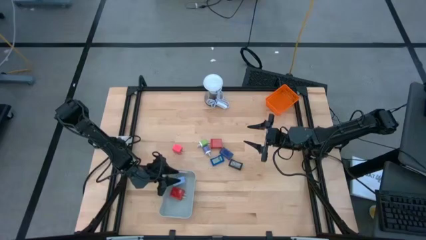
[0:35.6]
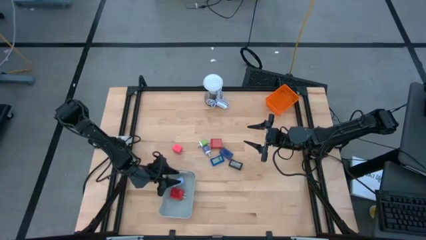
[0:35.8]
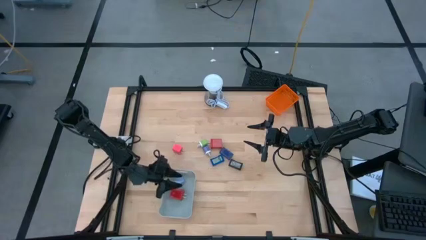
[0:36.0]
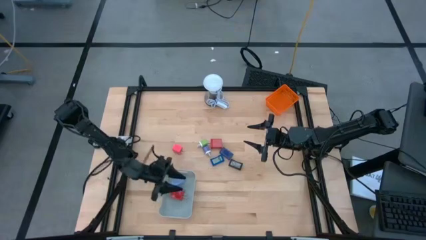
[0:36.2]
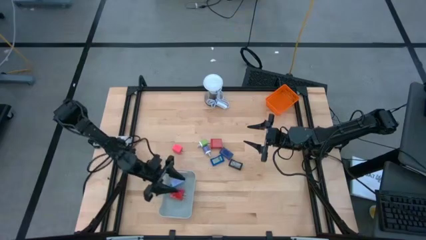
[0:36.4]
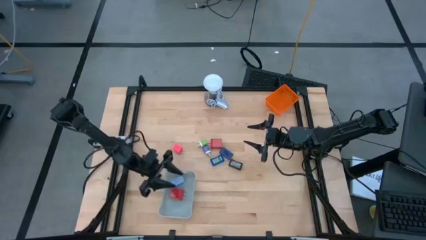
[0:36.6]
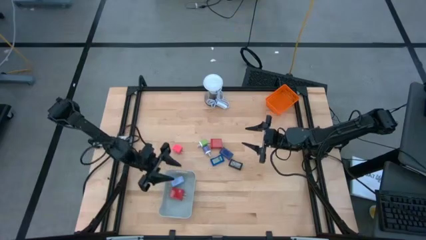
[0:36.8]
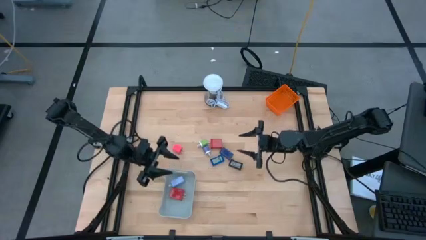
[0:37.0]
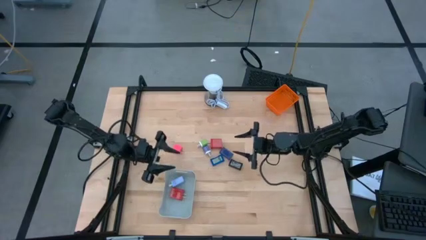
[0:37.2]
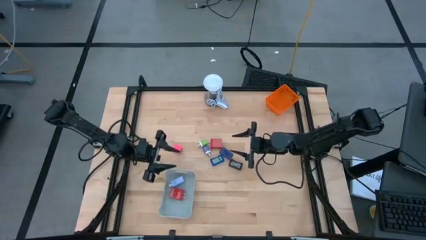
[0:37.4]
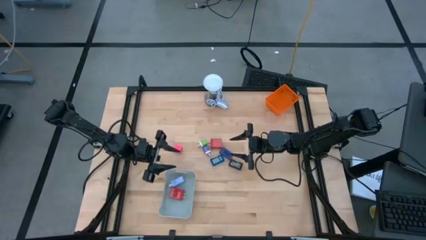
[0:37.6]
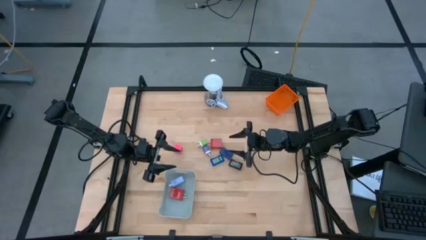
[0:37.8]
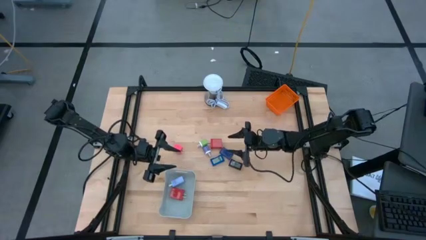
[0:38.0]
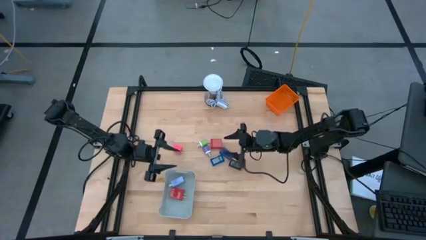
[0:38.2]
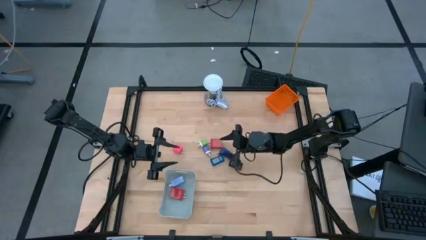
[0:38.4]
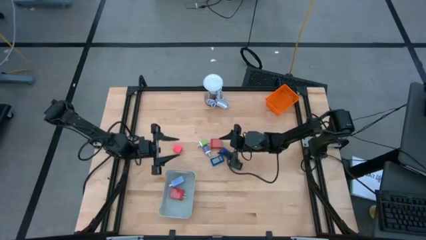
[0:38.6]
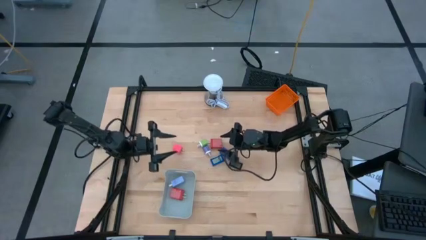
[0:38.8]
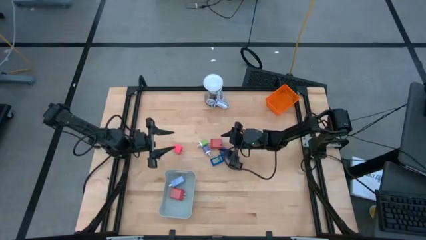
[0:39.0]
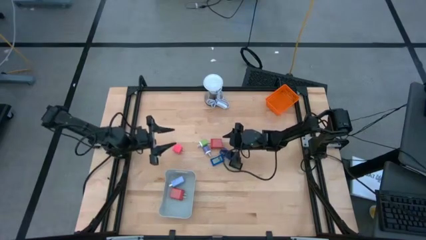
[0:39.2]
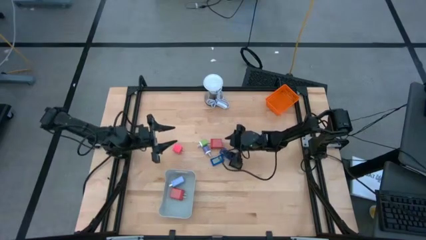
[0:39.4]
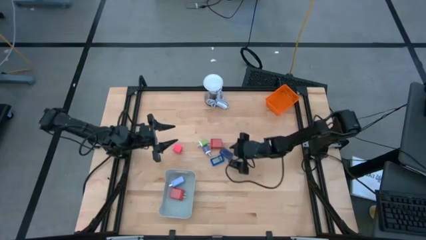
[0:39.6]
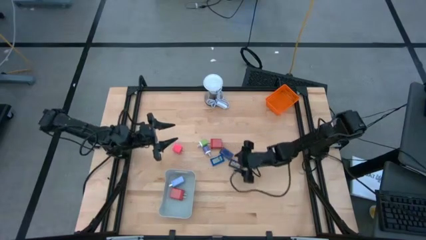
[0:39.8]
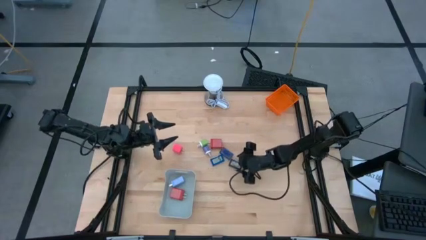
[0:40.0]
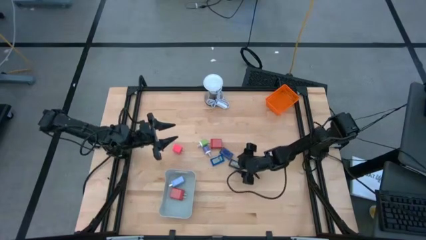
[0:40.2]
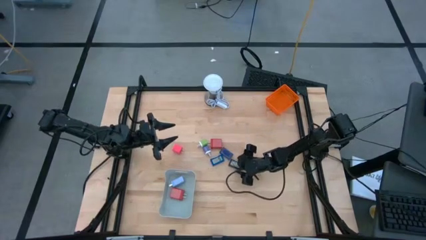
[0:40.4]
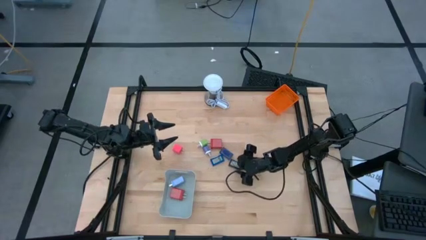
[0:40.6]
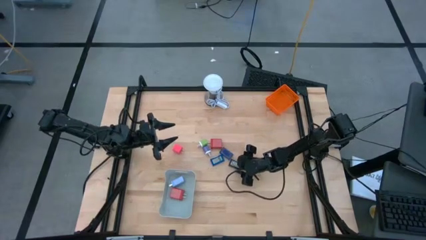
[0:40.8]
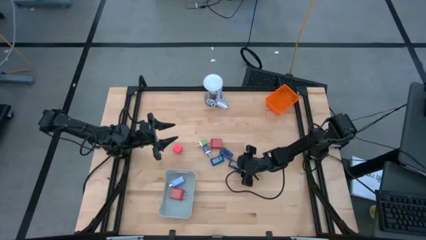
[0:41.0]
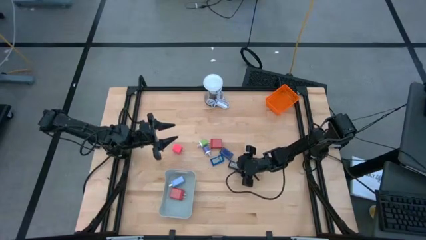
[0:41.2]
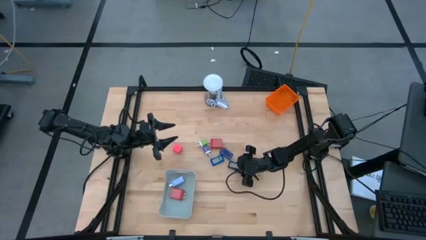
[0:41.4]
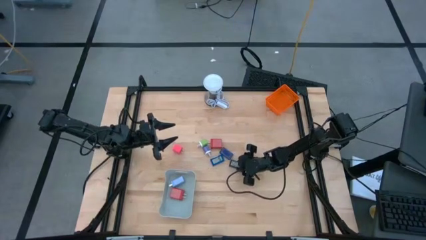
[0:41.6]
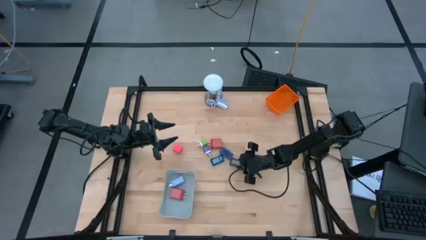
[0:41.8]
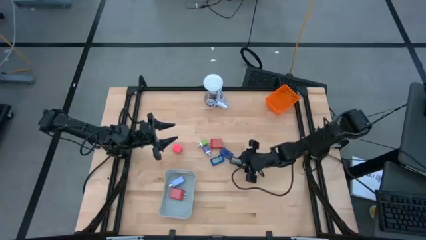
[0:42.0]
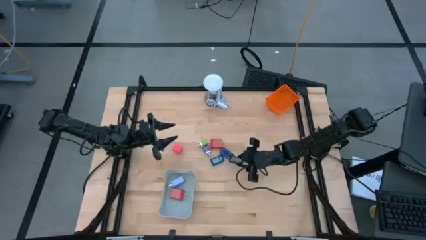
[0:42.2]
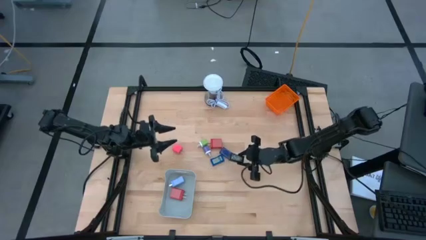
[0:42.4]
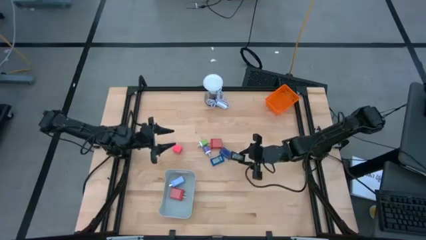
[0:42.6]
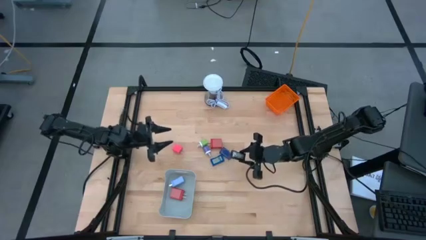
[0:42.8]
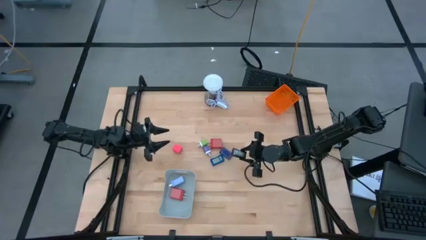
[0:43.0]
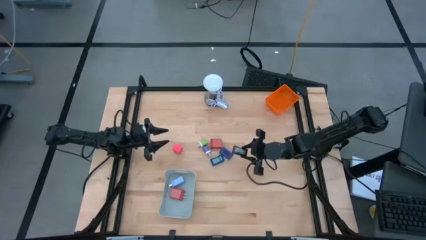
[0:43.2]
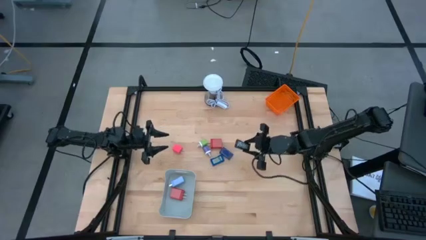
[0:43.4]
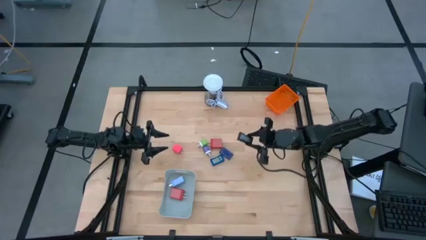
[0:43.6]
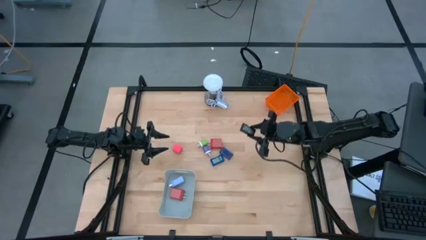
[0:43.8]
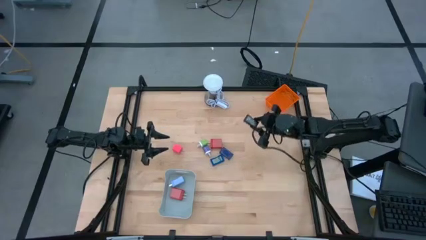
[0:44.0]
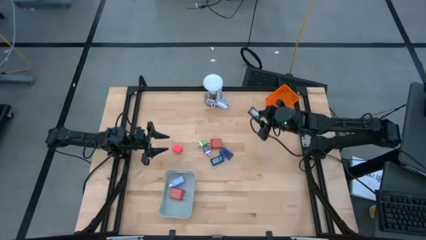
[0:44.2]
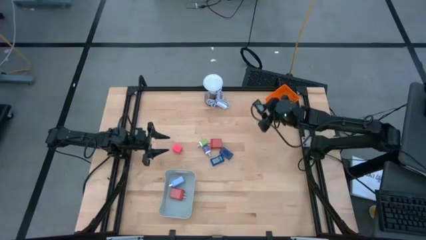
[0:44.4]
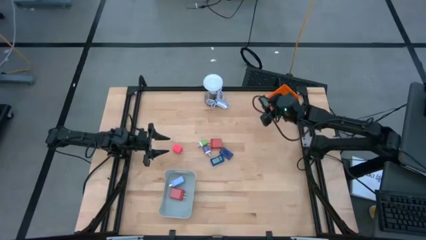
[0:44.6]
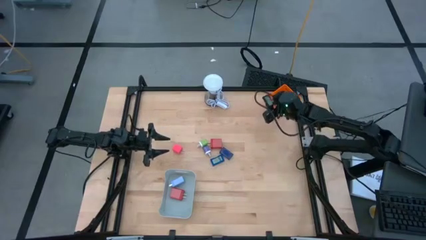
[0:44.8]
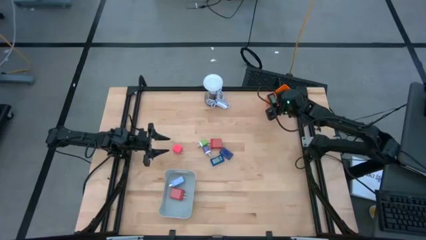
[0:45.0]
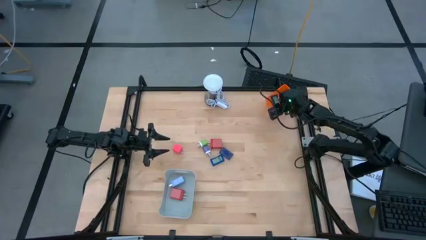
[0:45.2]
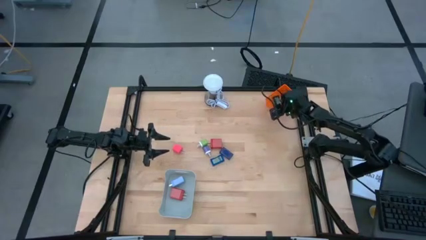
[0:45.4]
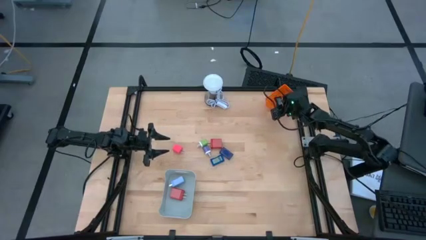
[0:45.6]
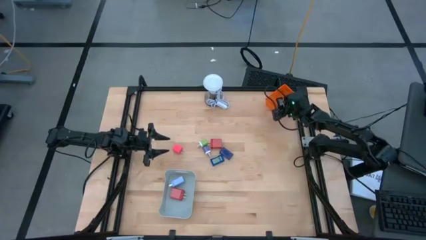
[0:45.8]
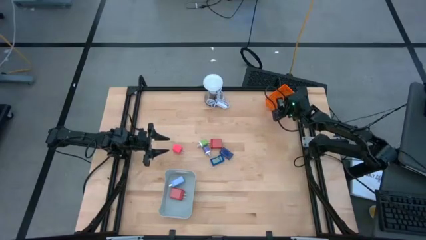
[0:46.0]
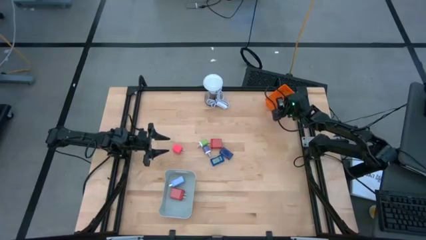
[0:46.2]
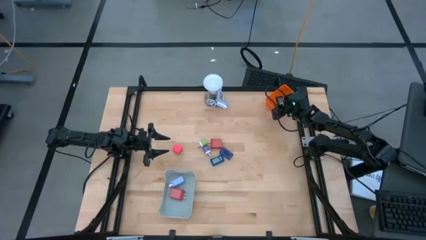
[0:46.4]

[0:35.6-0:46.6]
Task: Pick & Place Office items
Put the black digital clock into the orange bin
